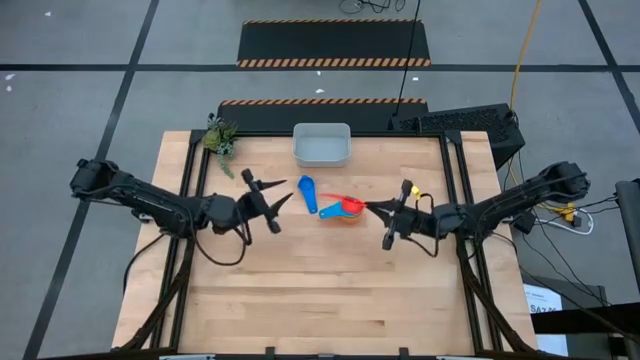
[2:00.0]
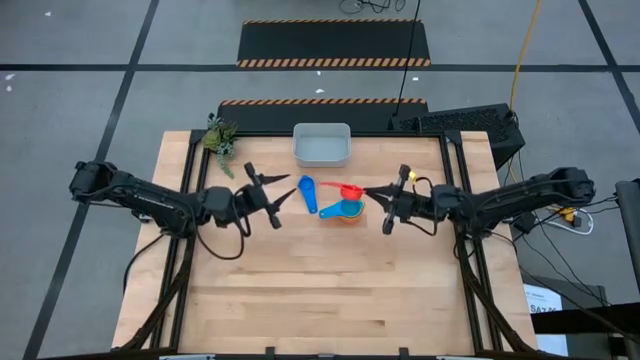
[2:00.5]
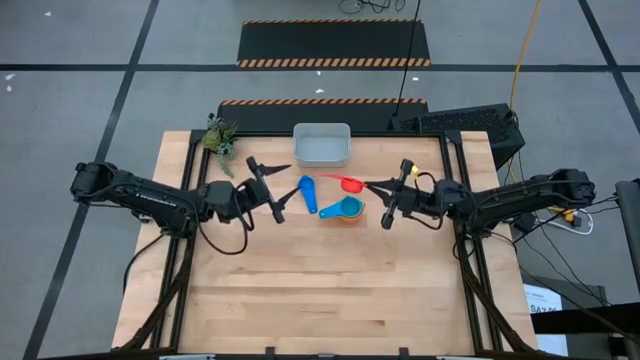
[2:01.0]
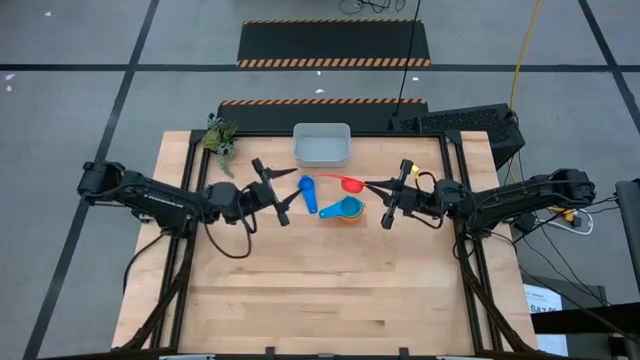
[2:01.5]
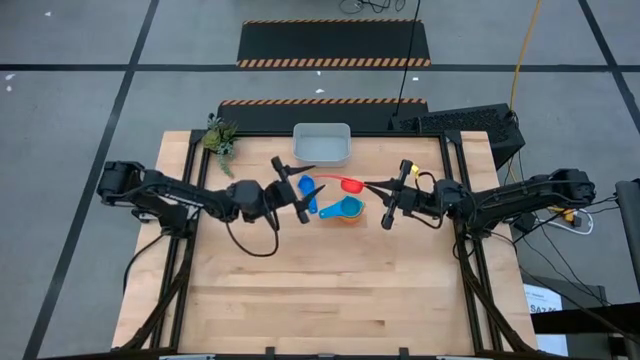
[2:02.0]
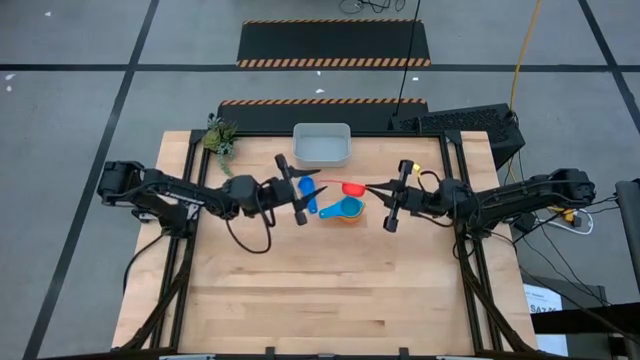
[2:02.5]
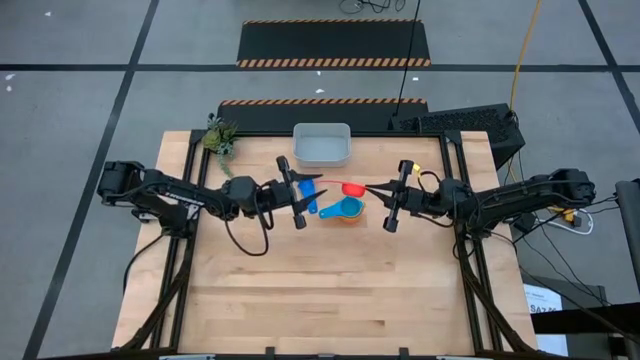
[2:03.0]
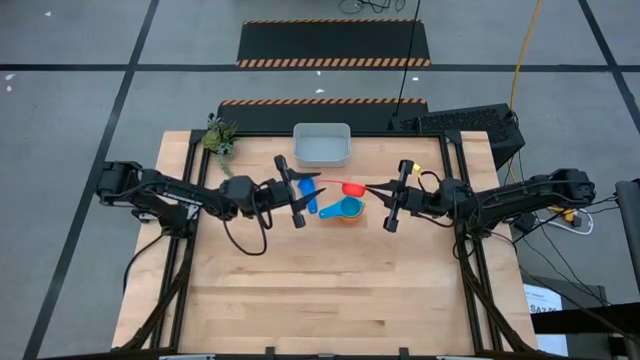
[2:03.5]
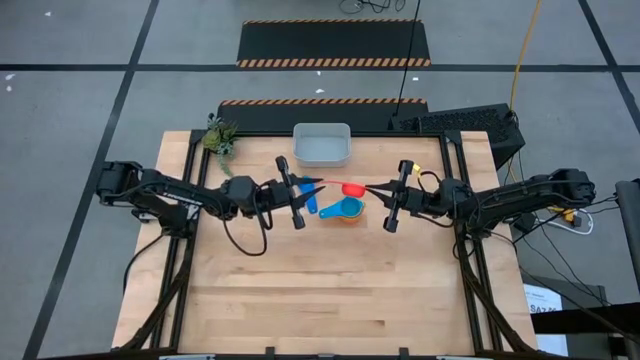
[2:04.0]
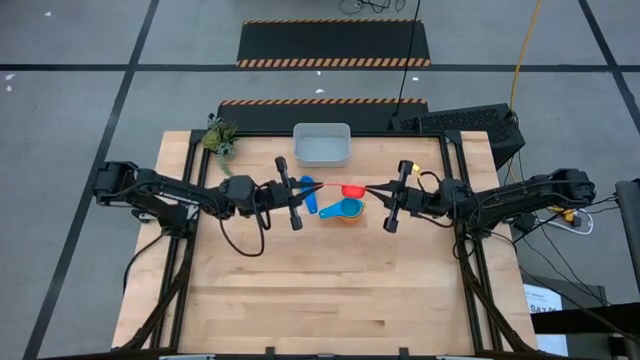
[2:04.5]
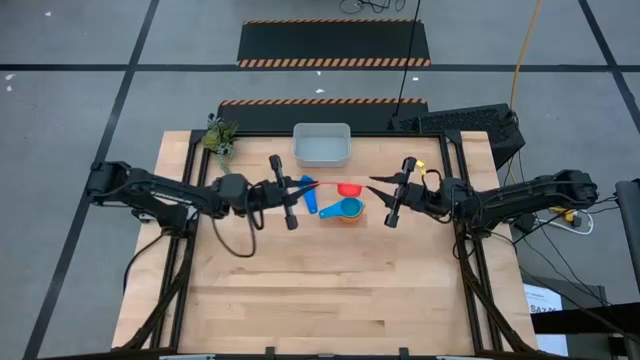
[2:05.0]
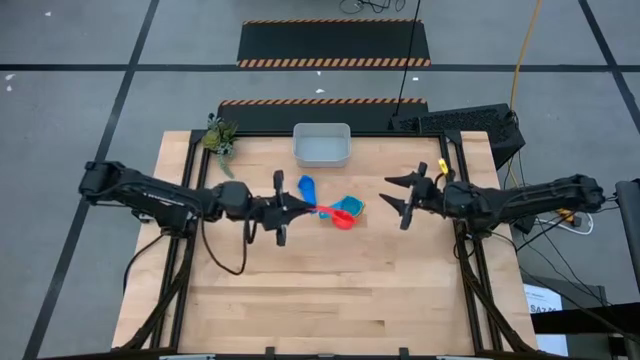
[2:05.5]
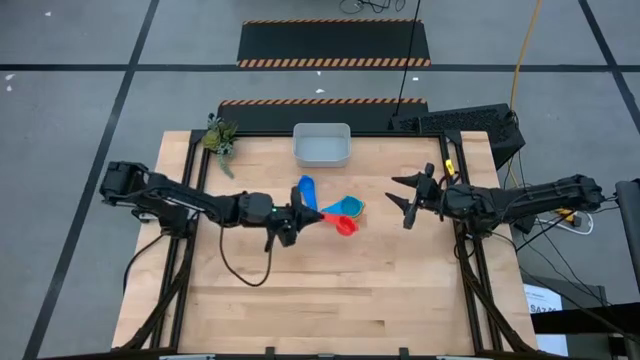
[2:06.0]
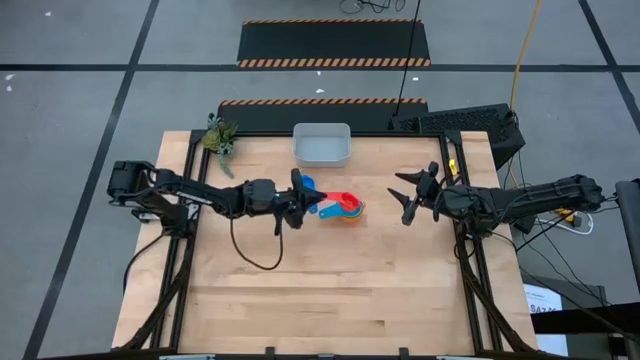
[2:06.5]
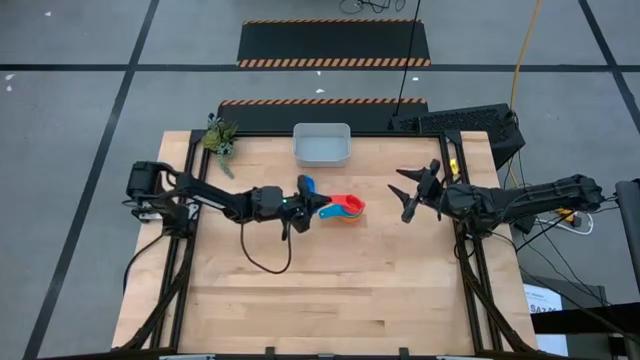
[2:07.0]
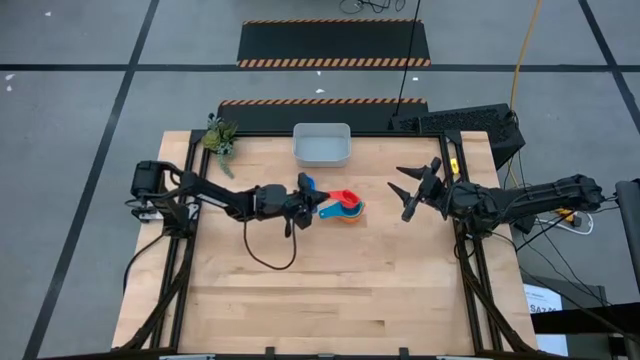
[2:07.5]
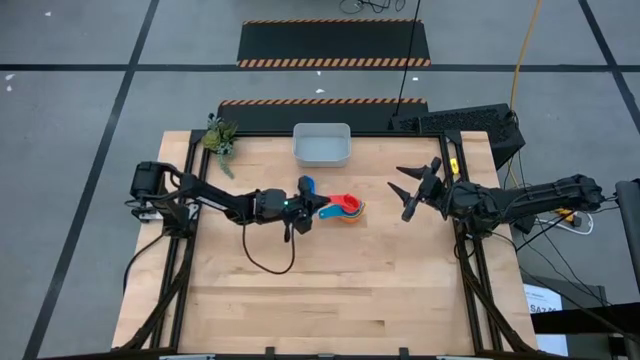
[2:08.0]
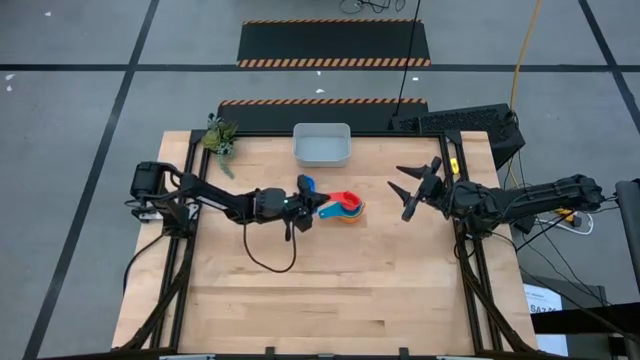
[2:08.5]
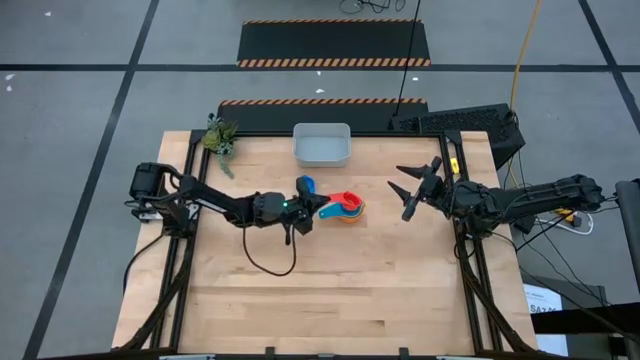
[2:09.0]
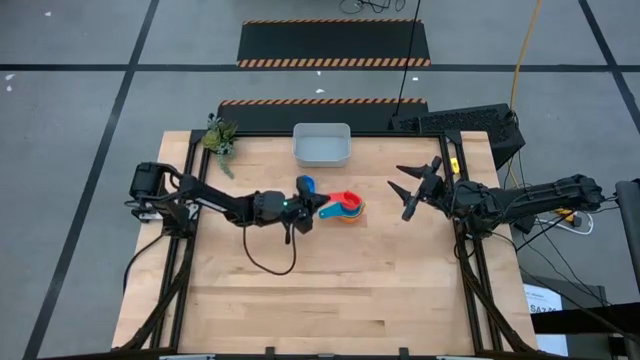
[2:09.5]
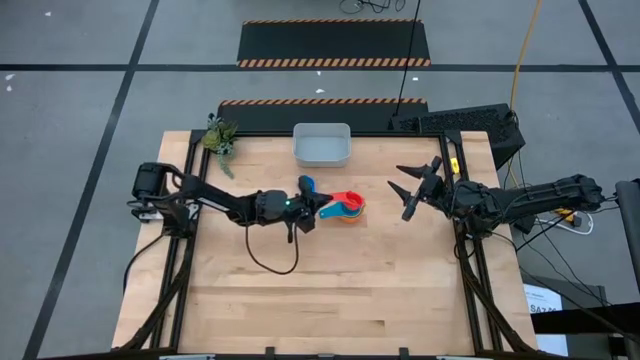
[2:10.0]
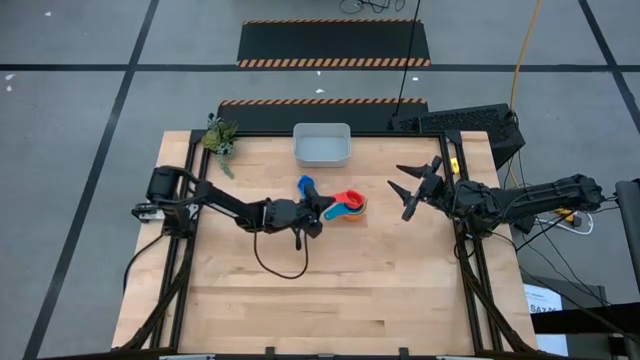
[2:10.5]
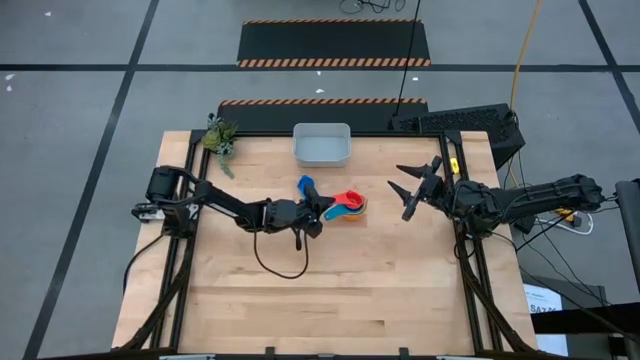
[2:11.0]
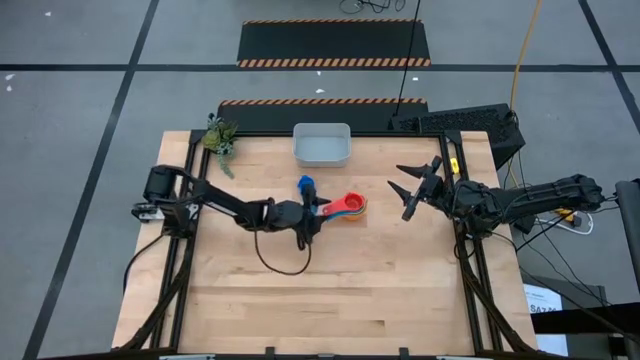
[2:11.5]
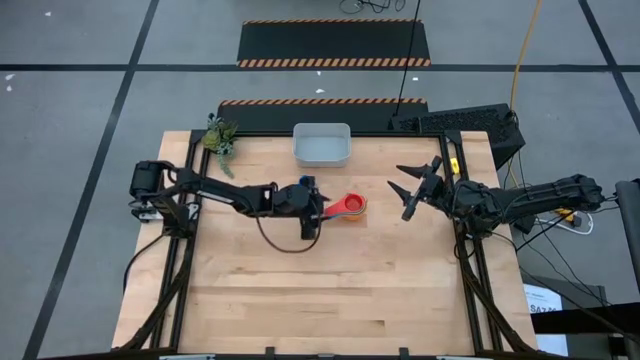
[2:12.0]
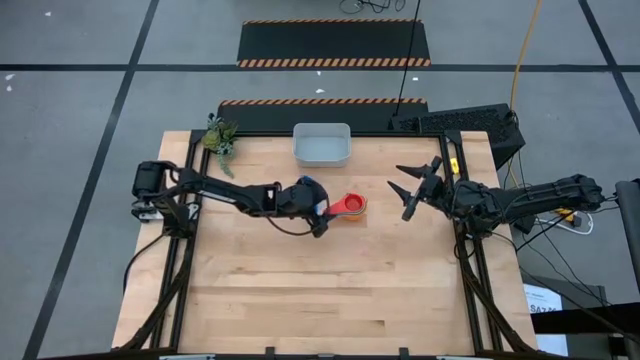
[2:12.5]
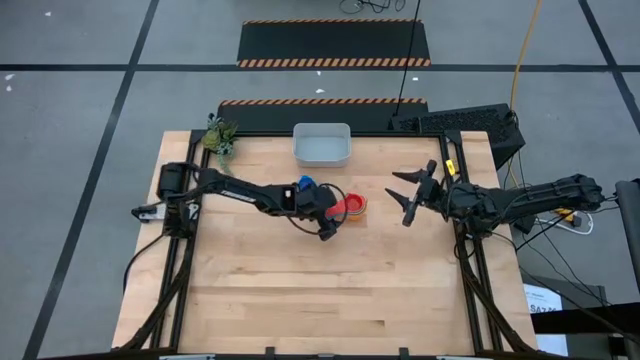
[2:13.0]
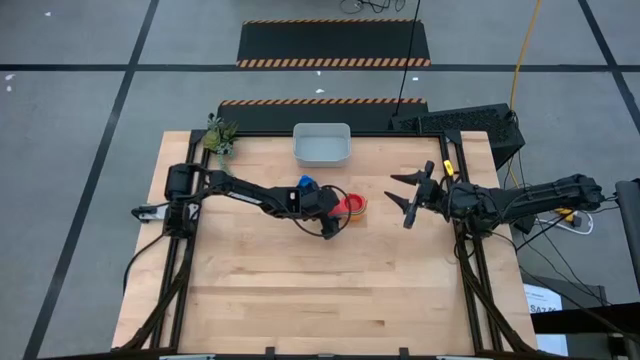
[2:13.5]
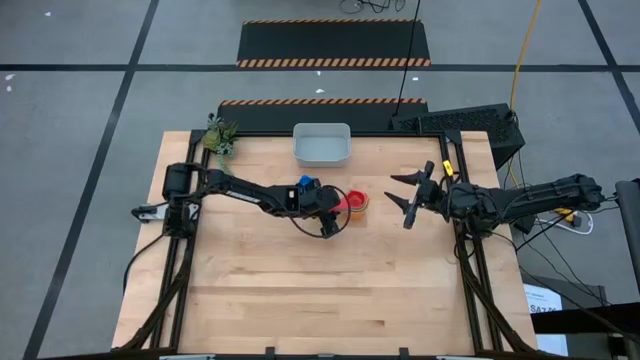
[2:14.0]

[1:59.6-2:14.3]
Task: Nest measuring cups in basket
Stack the red measuring cup into the light blue measuring cup

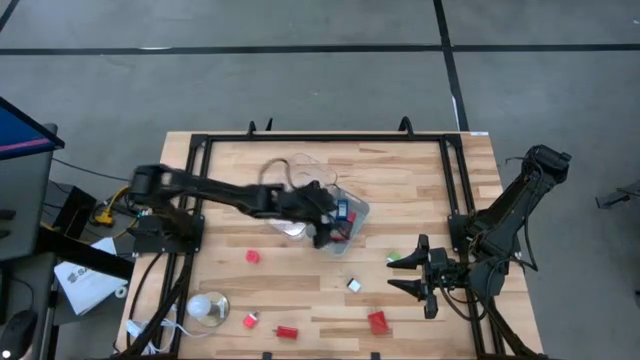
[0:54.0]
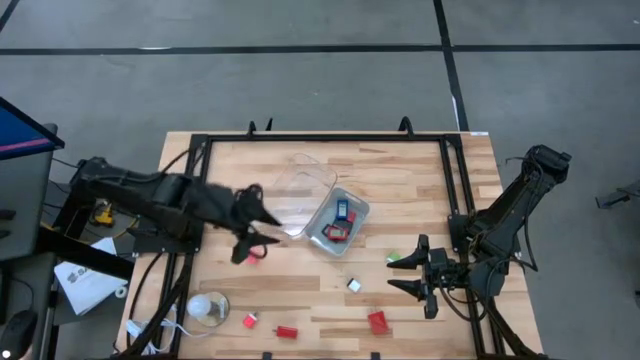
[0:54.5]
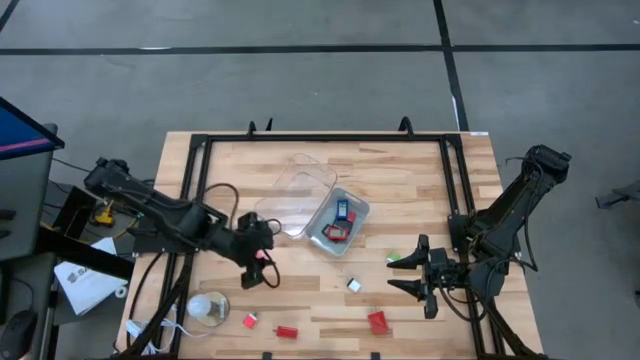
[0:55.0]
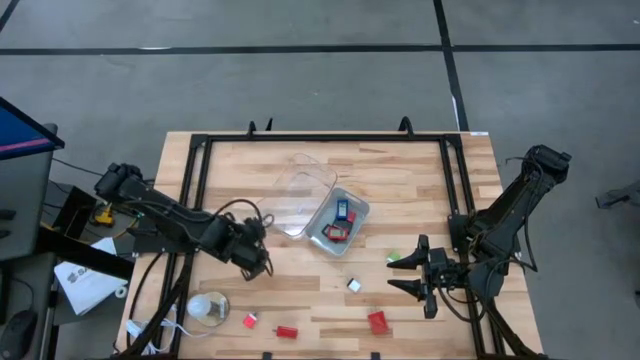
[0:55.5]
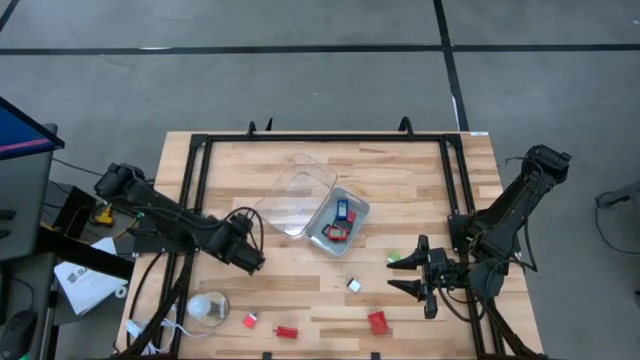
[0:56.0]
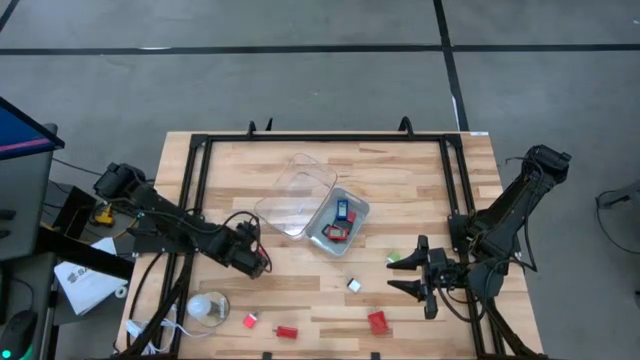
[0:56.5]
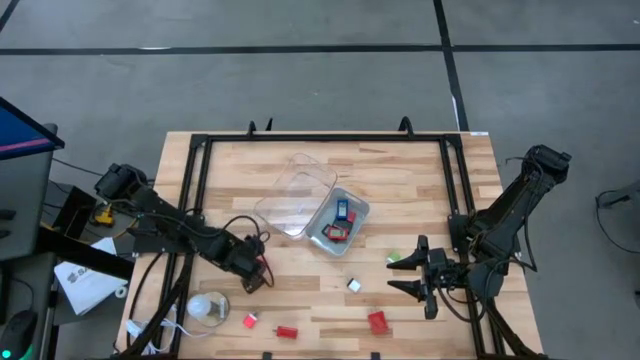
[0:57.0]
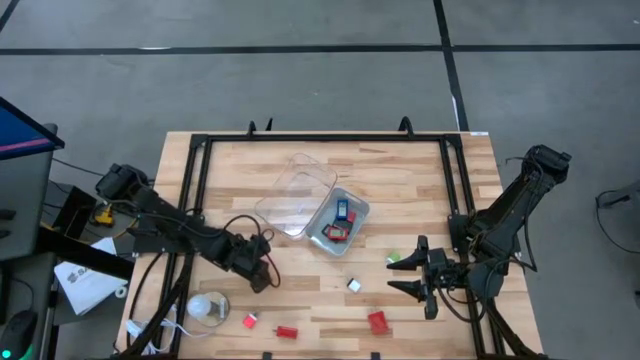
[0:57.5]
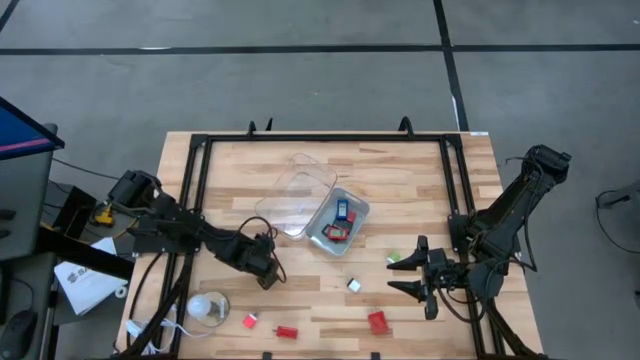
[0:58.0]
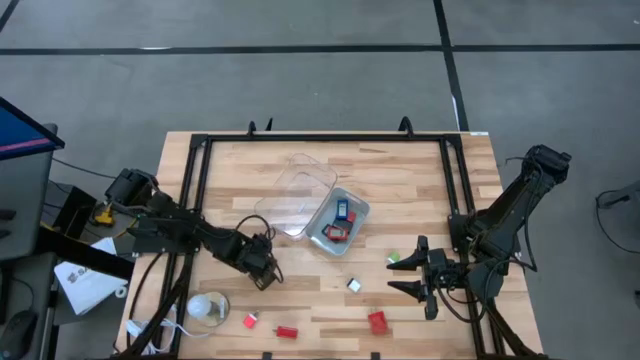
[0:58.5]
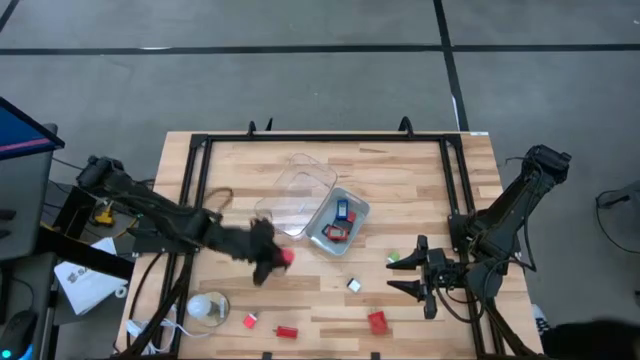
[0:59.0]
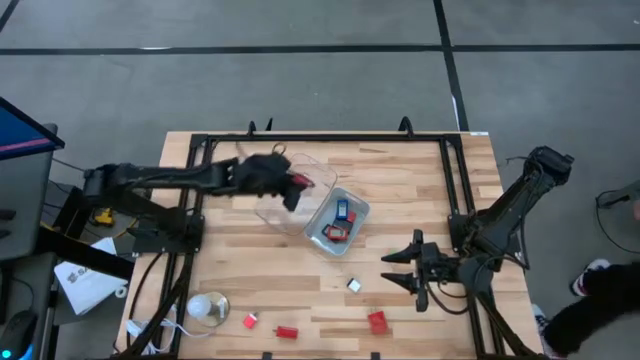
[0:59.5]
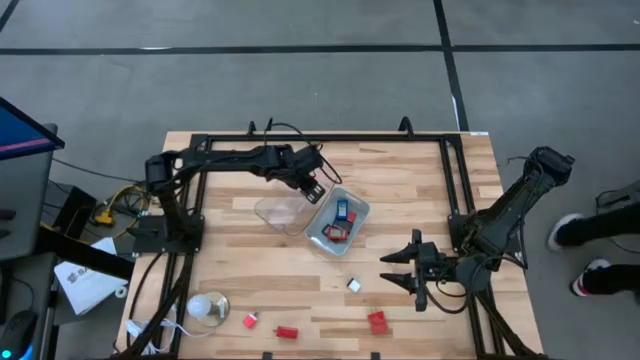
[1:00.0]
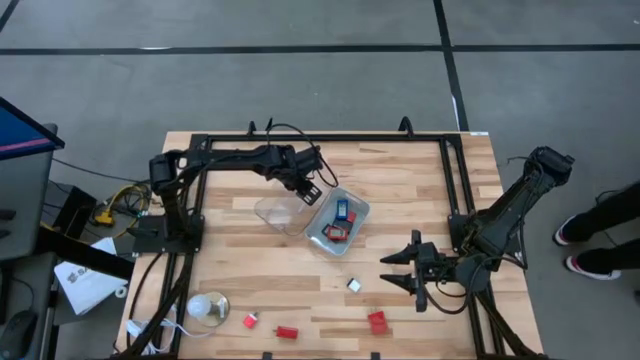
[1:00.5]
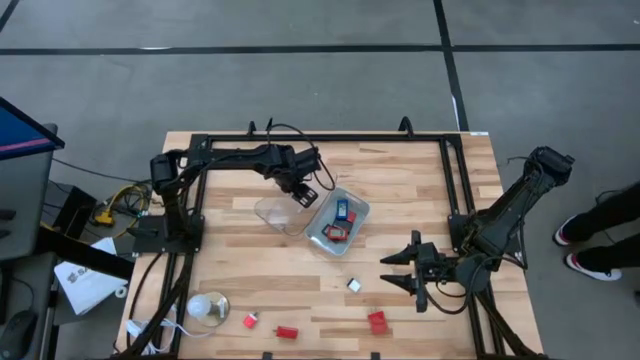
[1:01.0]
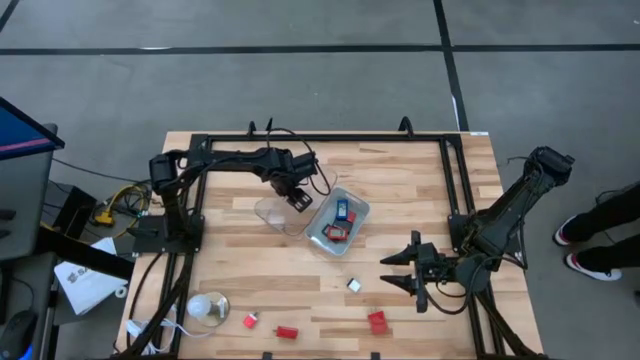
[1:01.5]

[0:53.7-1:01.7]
Task: Pick & Place Office items
Put the top pink charger adapter into the transparent bin
